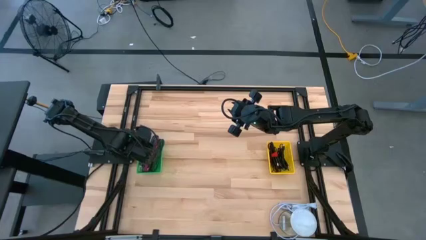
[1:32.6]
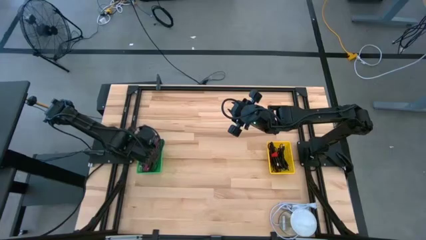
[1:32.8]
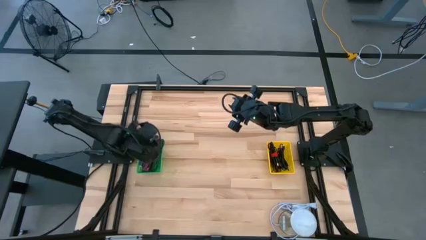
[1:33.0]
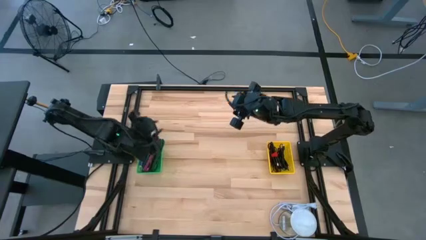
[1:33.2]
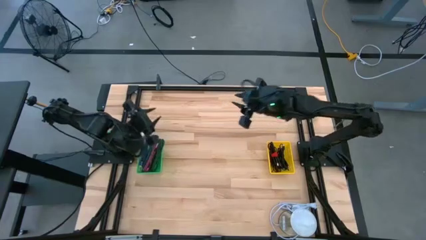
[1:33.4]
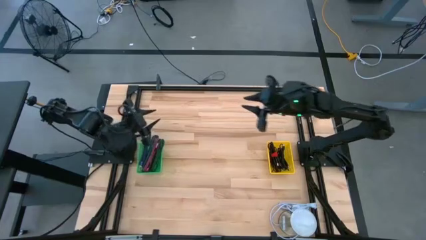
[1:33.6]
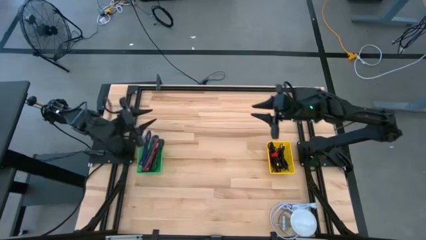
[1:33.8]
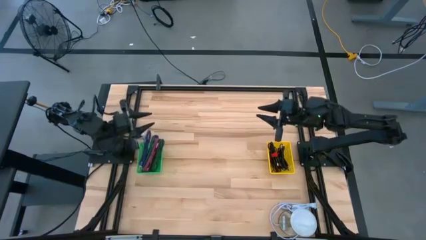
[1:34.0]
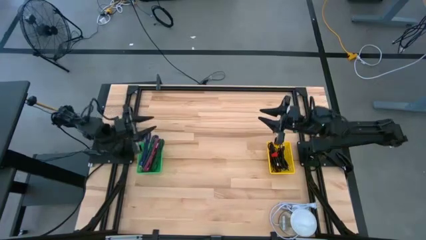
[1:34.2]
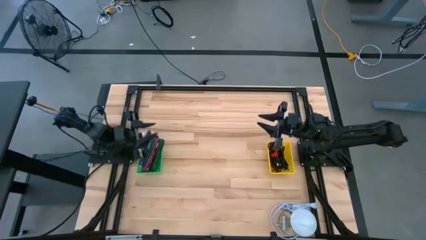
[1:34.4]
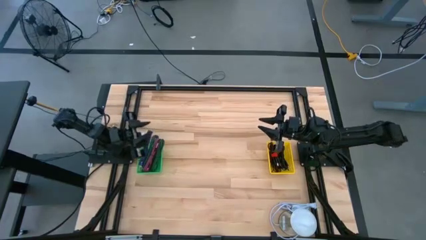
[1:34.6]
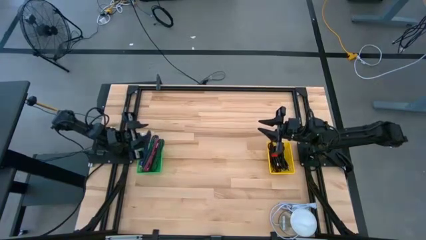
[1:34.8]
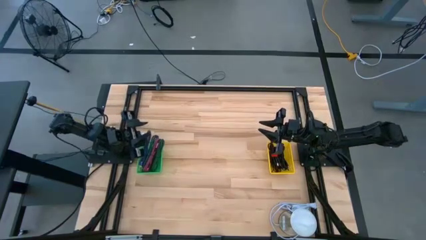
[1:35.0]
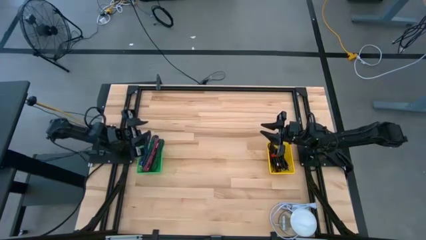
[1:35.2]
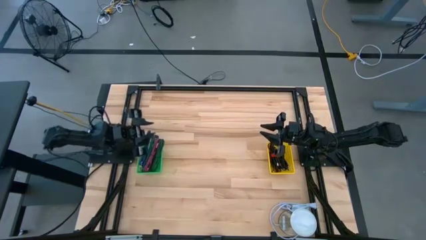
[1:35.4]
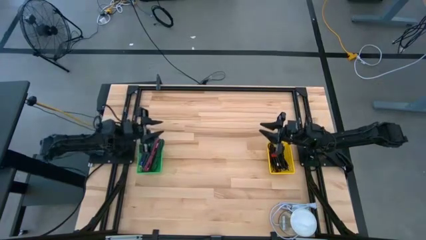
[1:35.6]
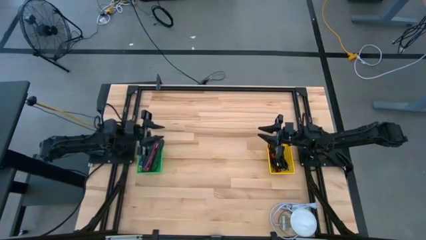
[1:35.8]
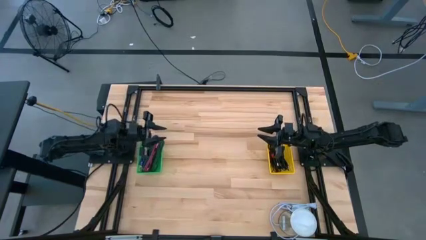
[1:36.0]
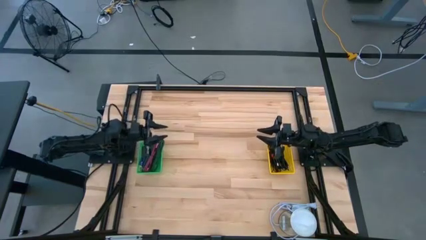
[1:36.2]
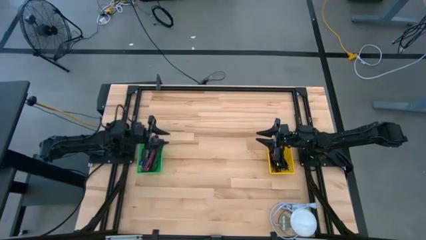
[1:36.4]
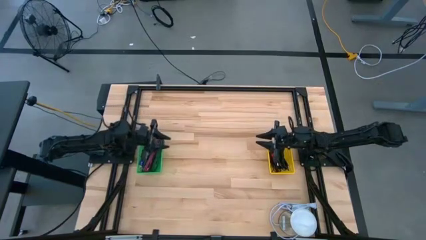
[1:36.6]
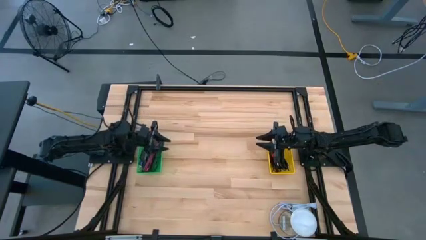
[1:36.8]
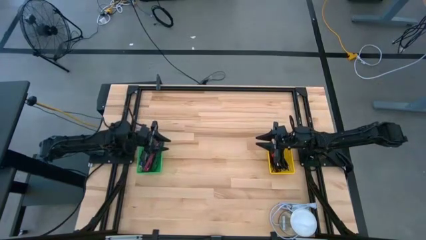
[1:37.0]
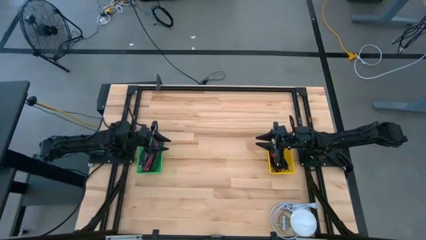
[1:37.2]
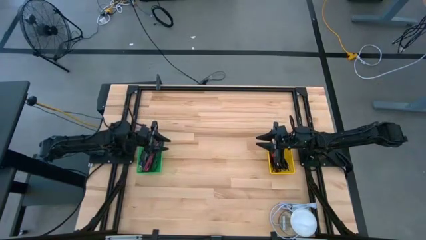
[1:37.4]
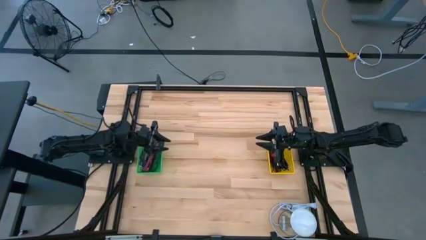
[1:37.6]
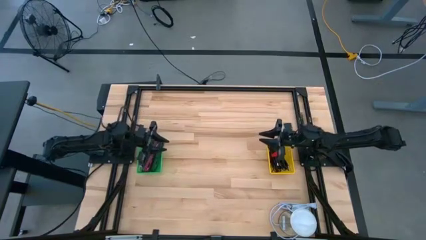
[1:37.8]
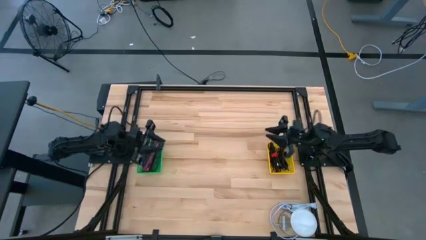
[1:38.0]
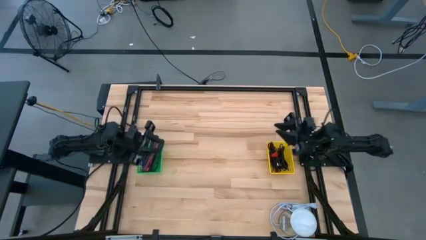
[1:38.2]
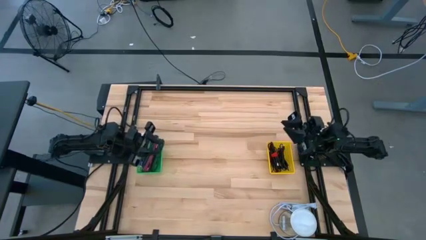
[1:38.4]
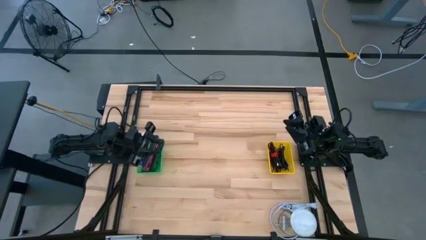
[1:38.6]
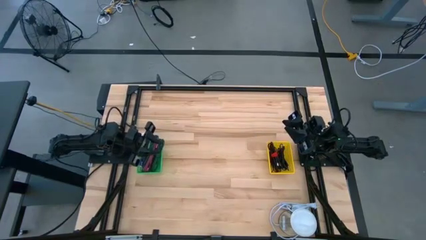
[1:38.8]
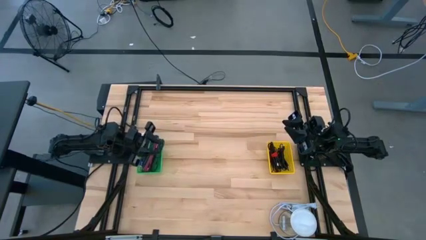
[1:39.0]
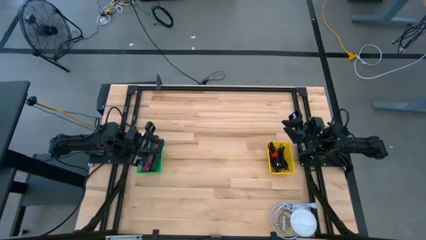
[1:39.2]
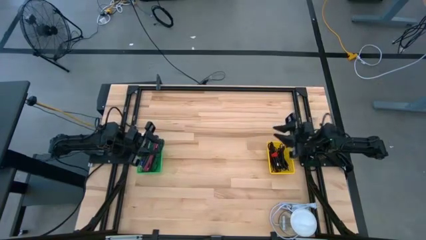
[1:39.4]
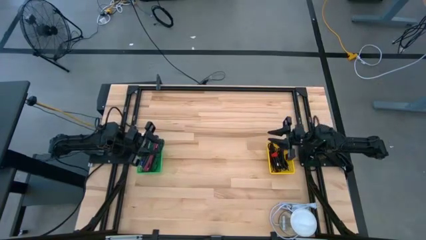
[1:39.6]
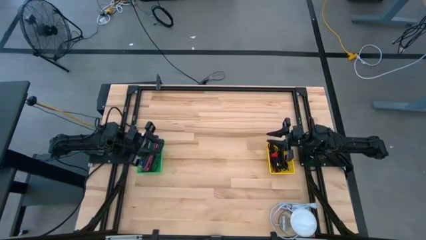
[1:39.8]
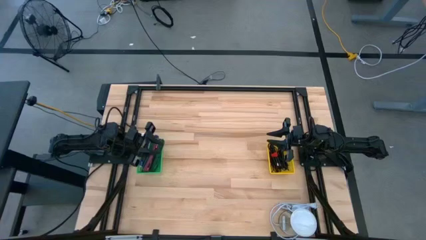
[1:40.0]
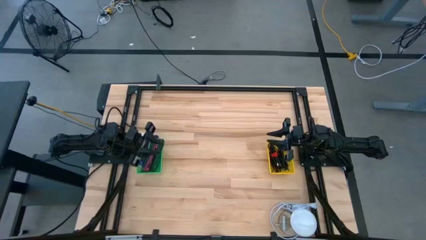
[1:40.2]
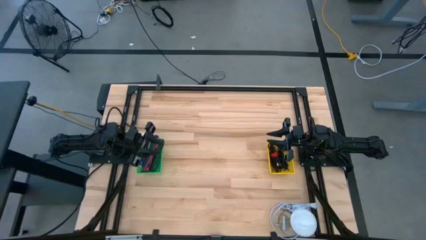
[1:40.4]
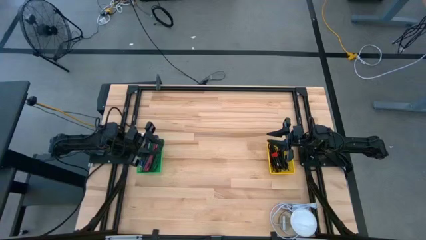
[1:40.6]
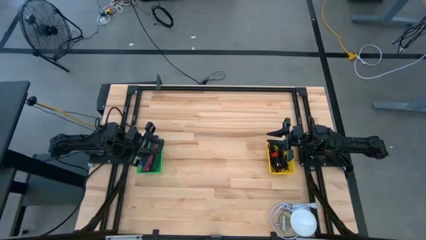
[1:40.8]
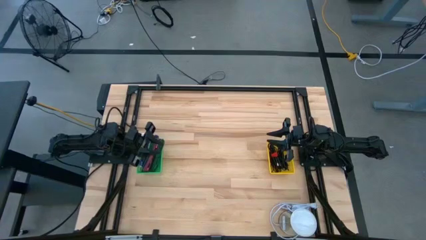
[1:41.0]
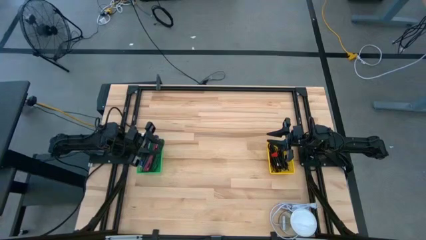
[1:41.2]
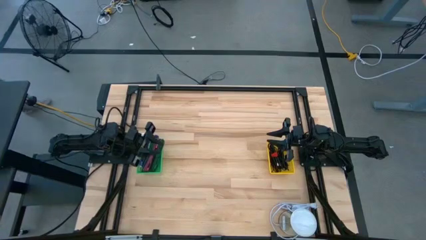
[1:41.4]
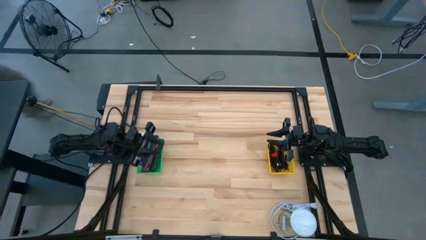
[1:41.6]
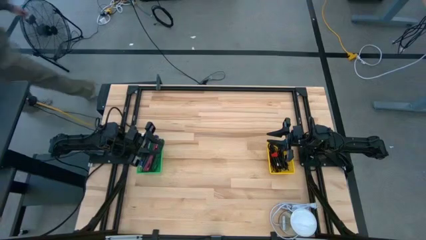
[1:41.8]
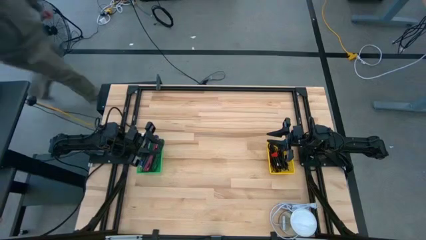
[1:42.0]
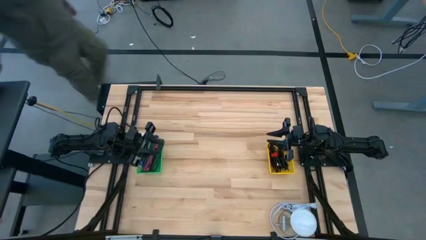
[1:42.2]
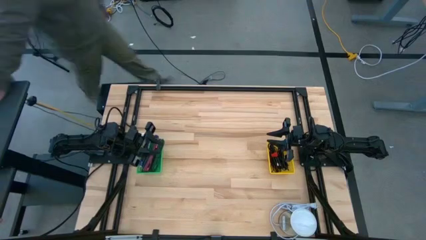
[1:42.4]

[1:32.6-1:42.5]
Task: Pick & Place USB Port
Return to Home Position

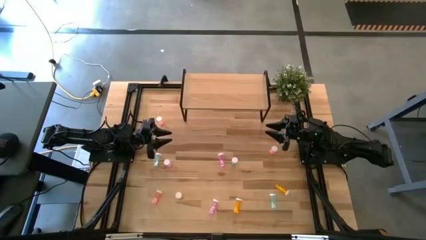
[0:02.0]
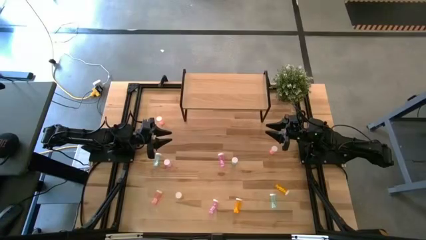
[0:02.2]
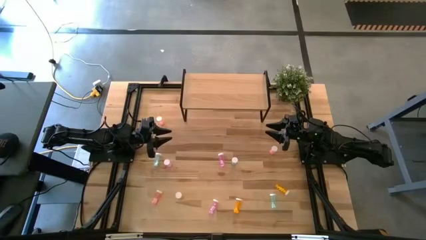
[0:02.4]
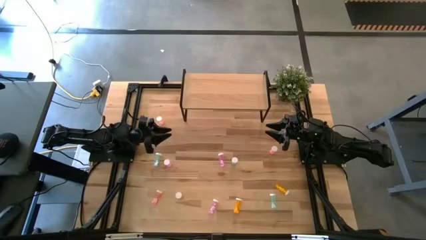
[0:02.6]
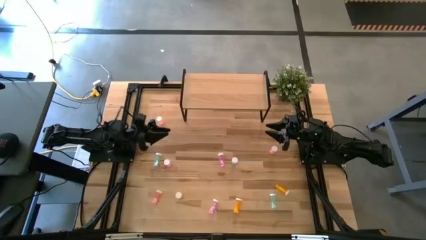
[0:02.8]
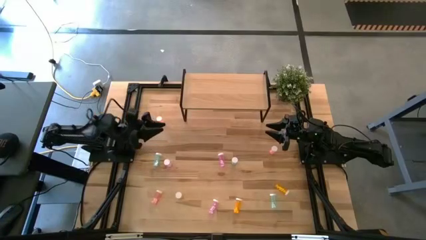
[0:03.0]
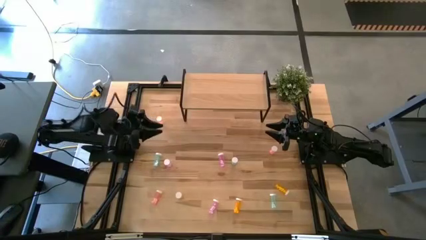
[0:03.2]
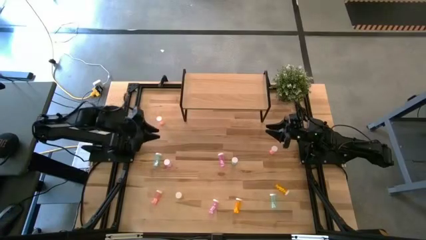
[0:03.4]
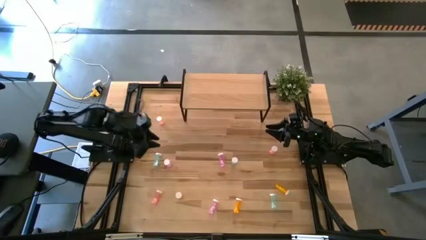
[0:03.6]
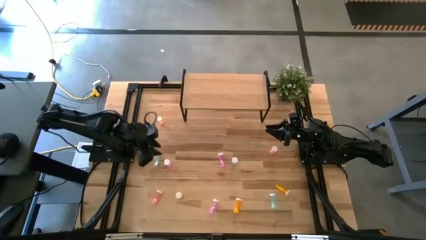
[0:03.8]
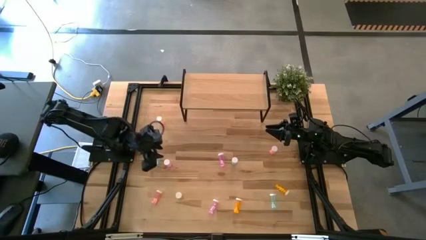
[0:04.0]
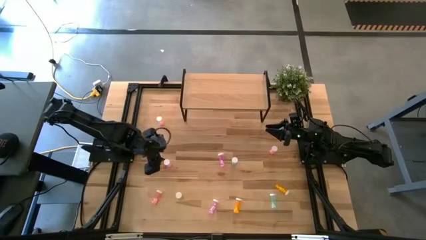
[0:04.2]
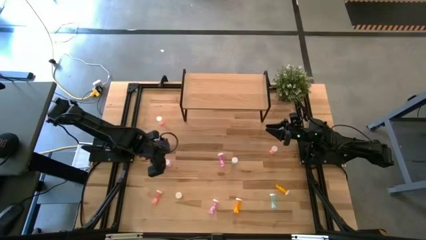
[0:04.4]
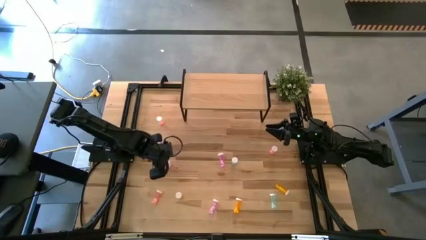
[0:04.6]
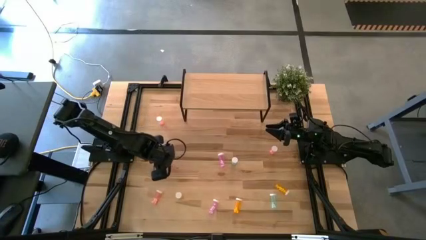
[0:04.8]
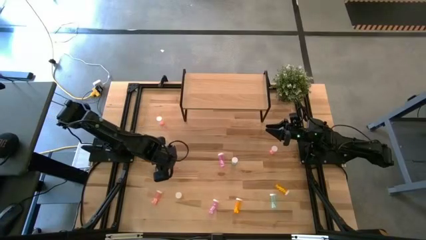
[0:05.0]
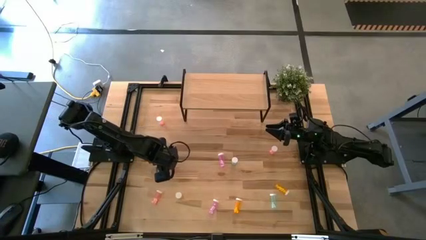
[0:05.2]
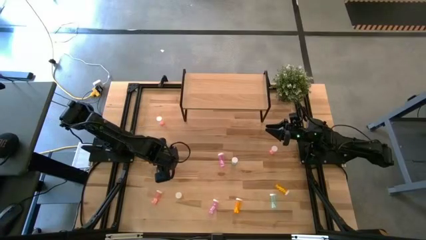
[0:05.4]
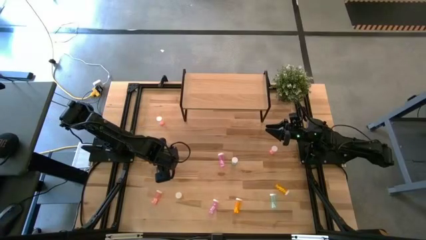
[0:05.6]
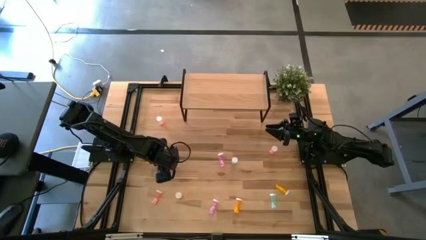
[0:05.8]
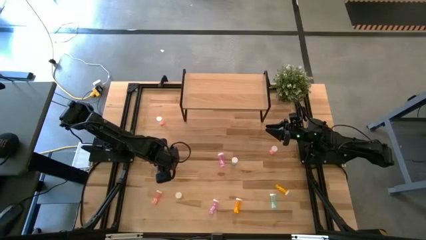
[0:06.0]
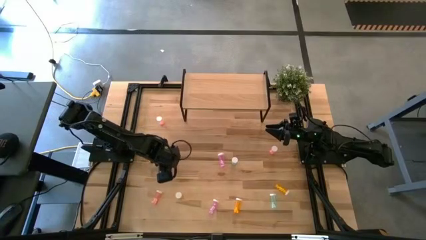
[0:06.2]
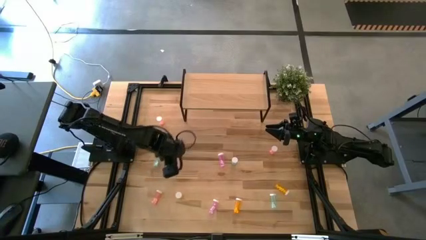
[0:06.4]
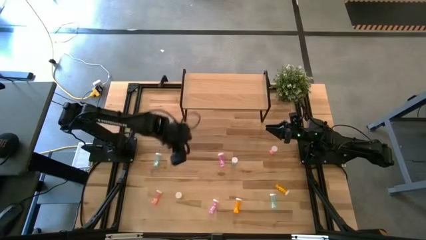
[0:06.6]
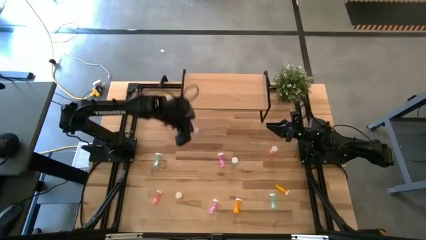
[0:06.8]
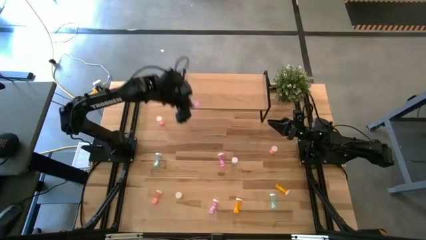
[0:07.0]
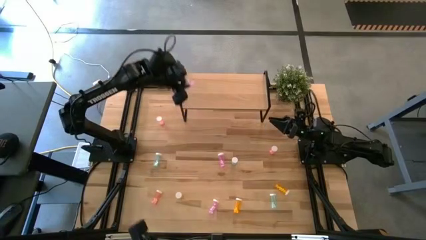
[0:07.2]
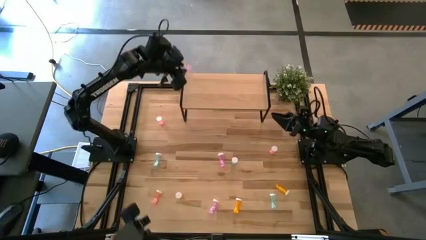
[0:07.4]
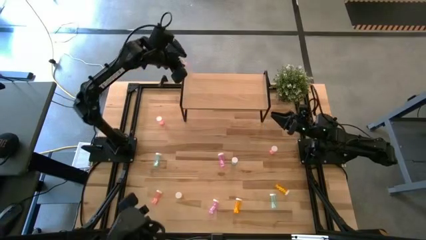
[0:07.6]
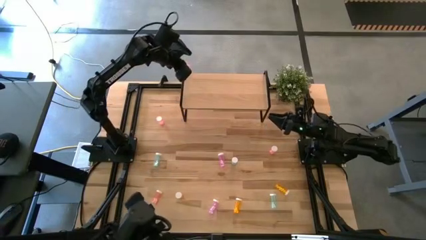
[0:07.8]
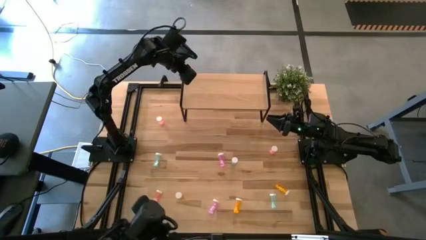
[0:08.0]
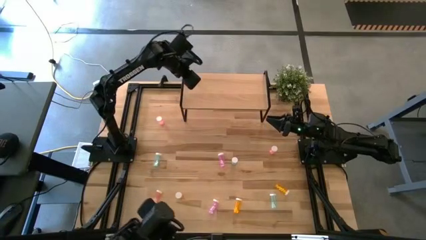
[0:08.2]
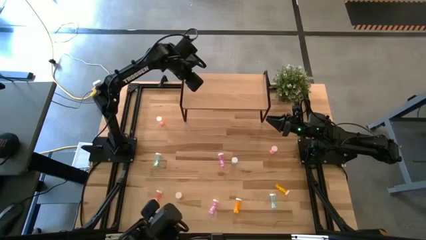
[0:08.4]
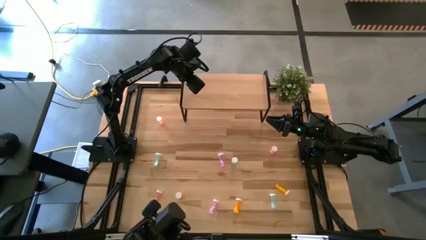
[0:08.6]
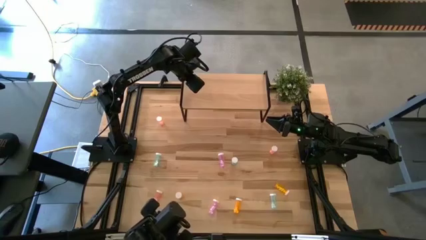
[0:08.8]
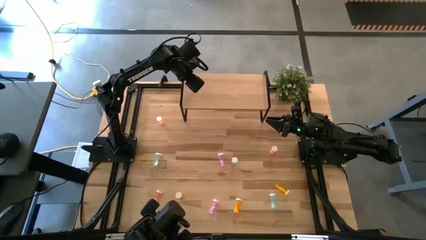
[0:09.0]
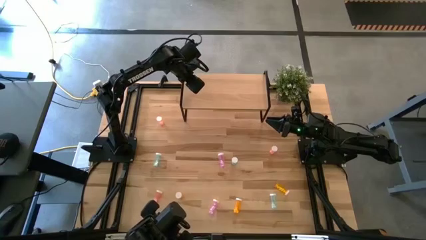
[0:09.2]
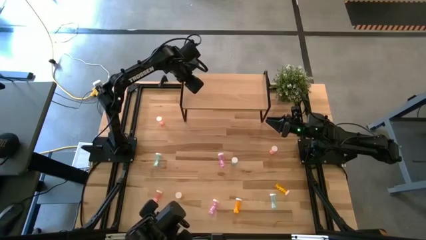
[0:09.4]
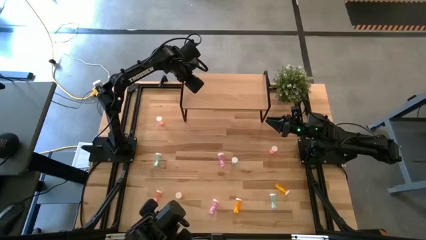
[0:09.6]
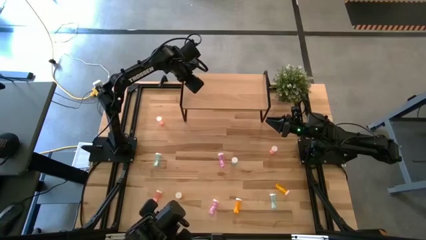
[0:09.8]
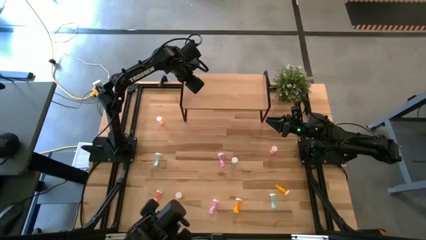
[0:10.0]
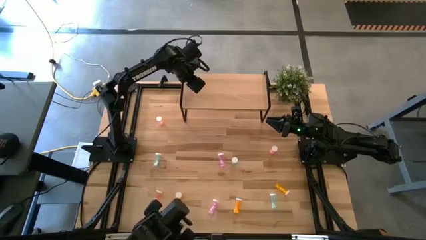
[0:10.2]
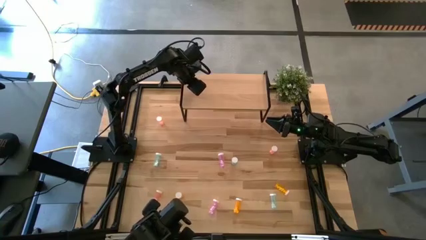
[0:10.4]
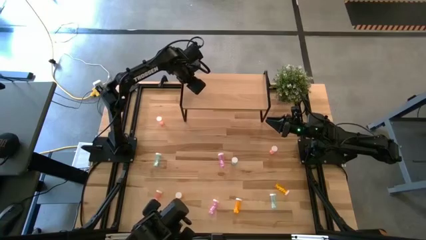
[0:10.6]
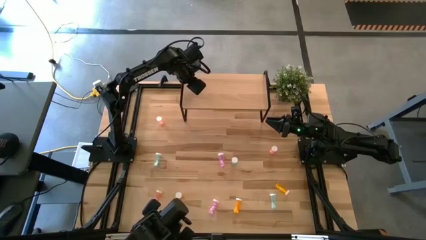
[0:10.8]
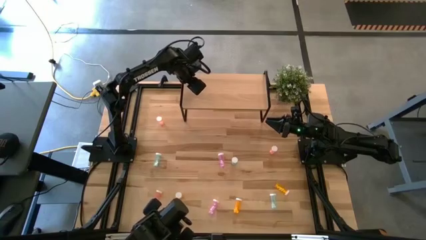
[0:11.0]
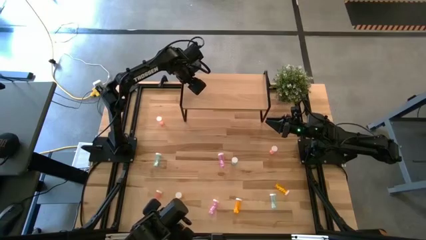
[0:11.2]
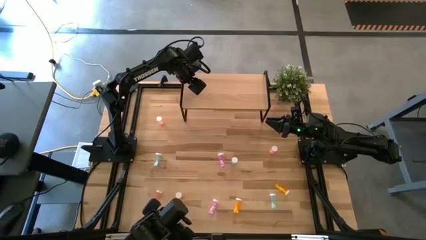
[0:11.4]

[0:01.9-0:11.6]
Task: Pick and place medicine bottles onto shelf by color
Put the top left violet pill bottle on the shelf
